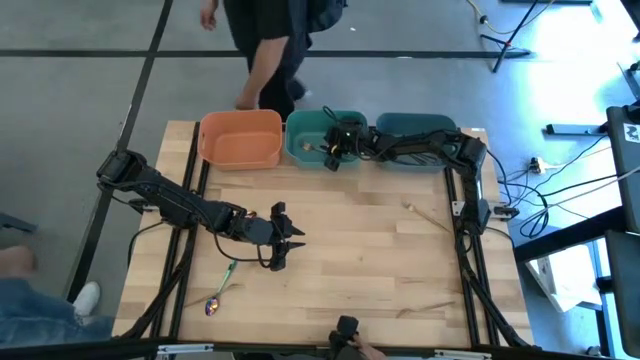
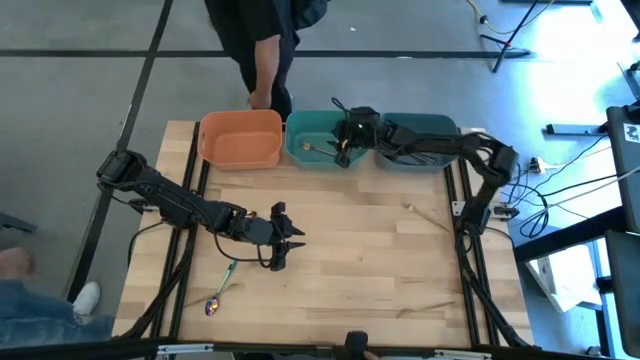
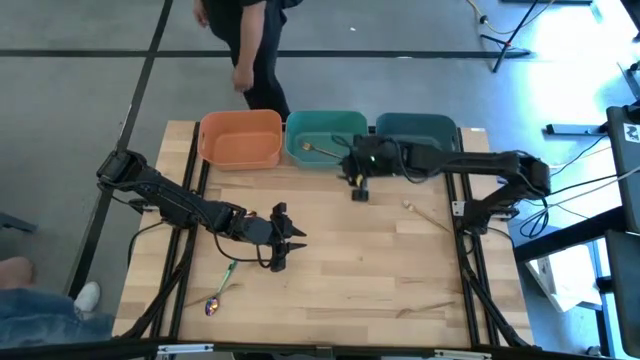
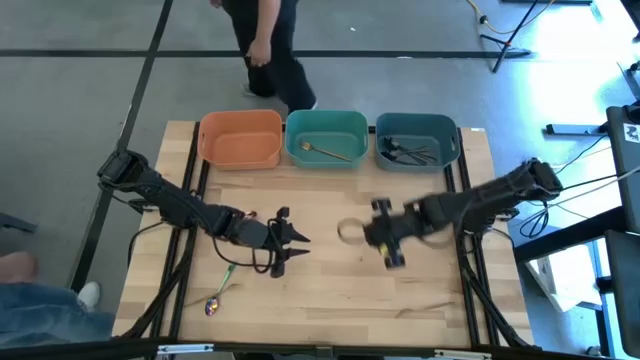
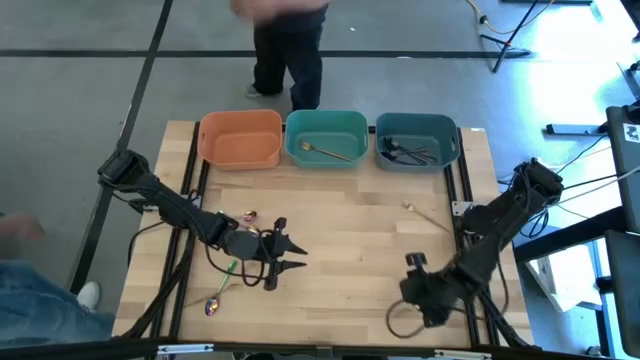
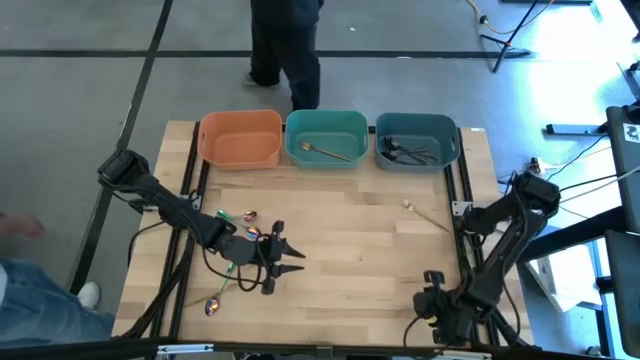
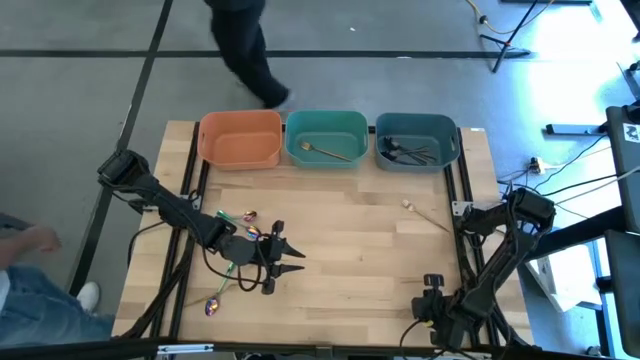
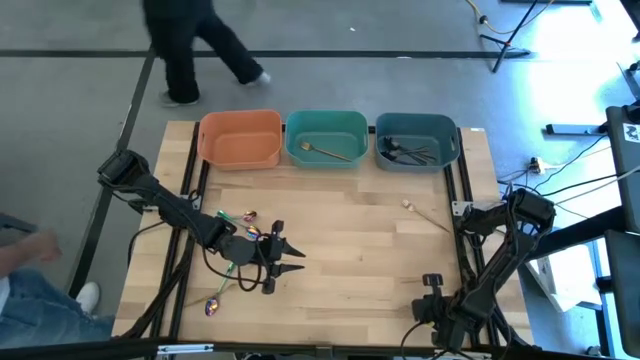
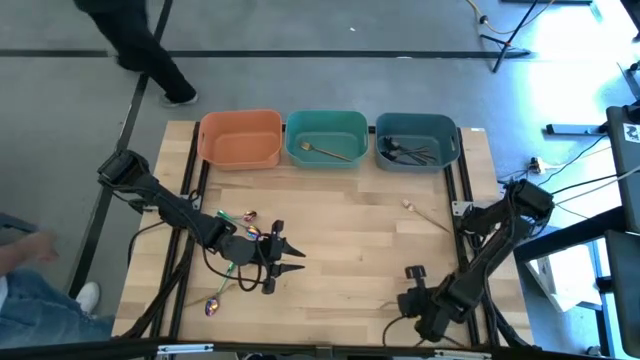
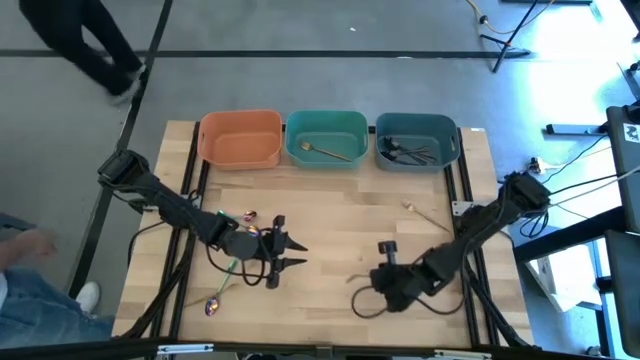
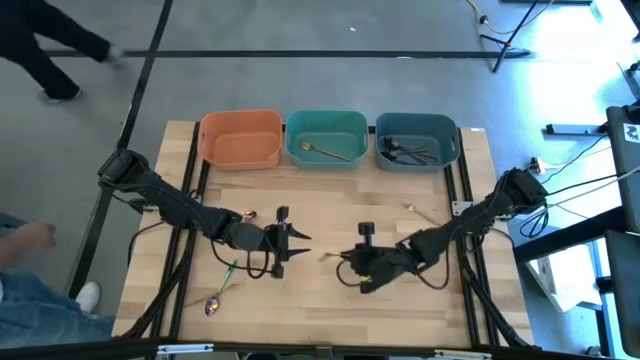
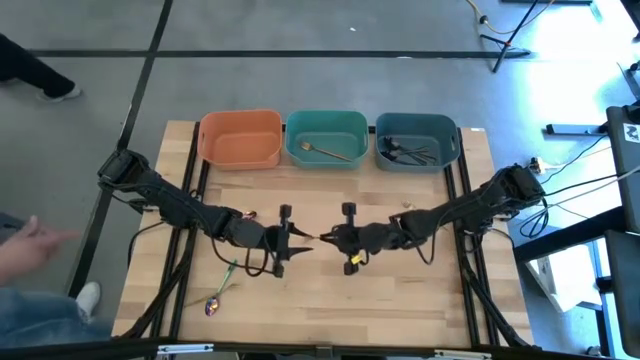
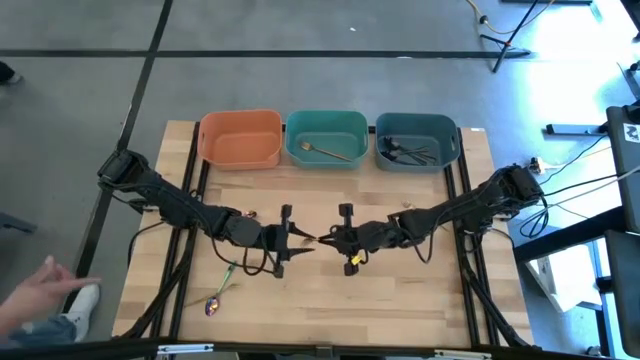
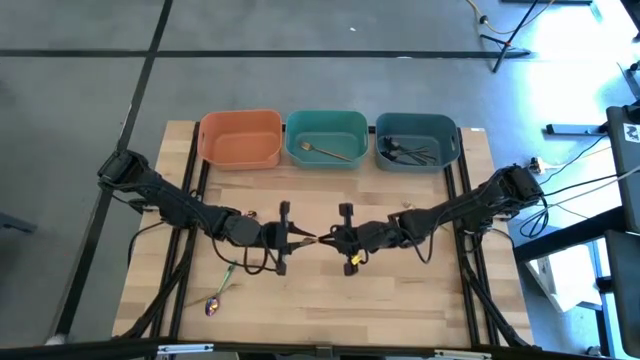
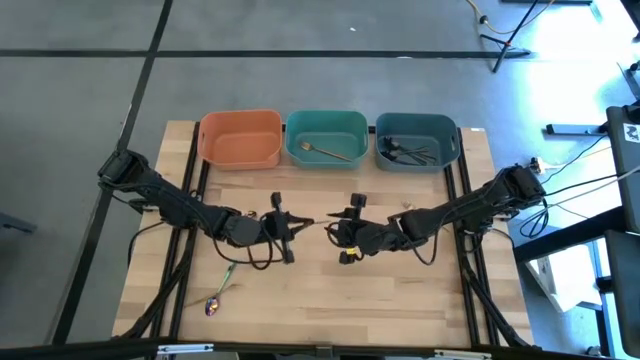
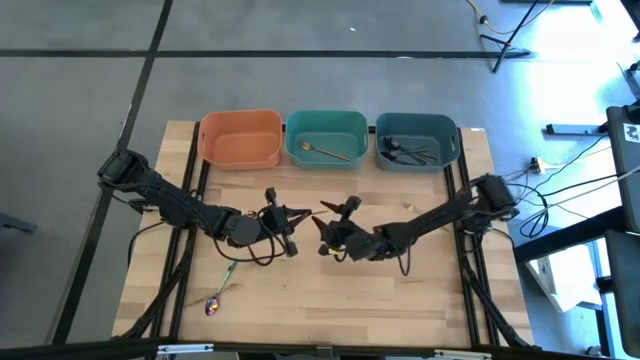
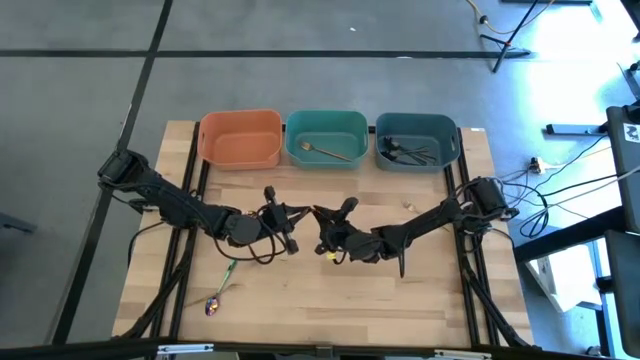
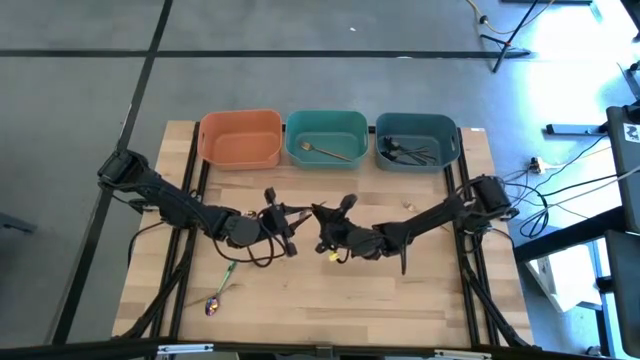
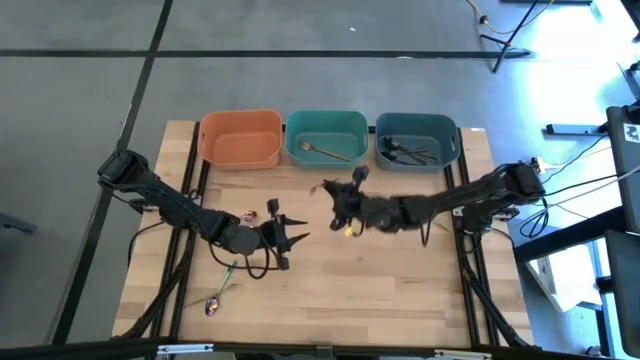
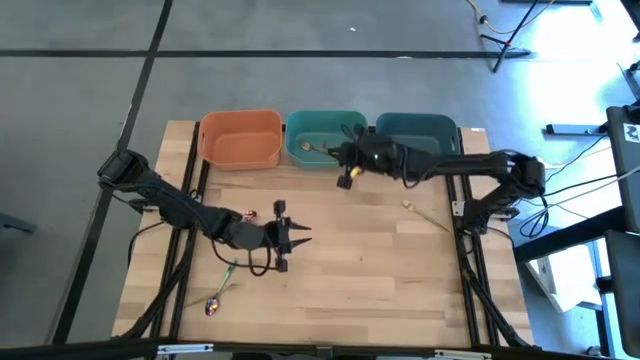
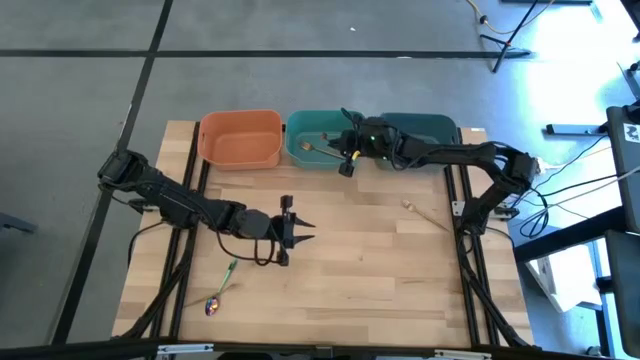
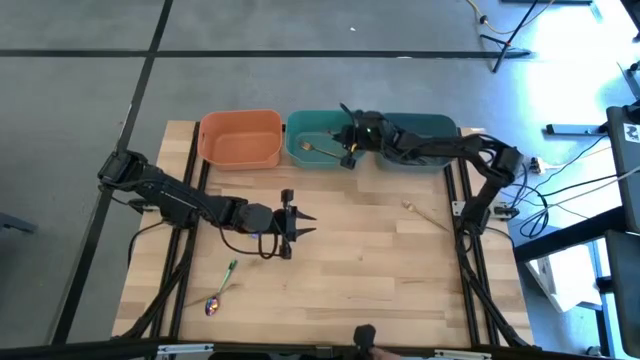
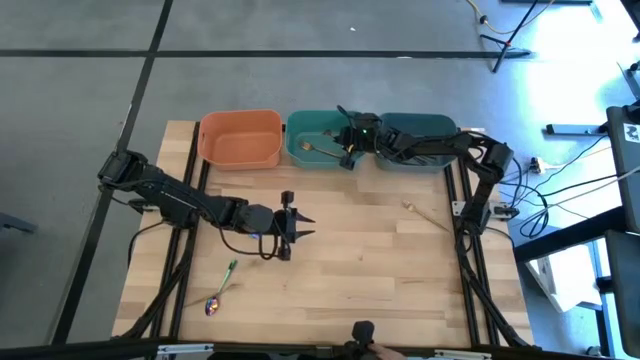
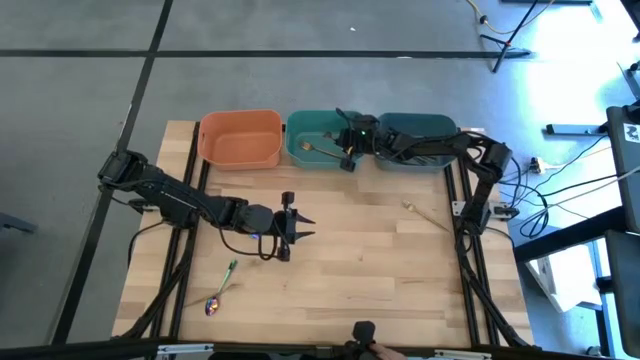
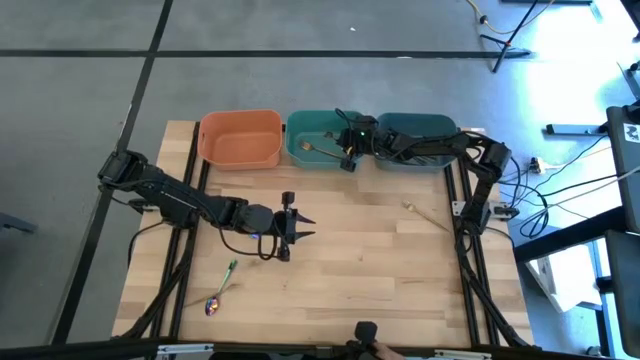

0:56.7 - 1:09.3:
Task: Sort silverware by color (type)
Put the gold fork into the green bin

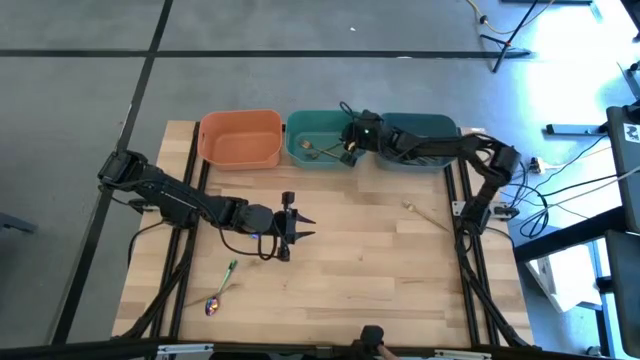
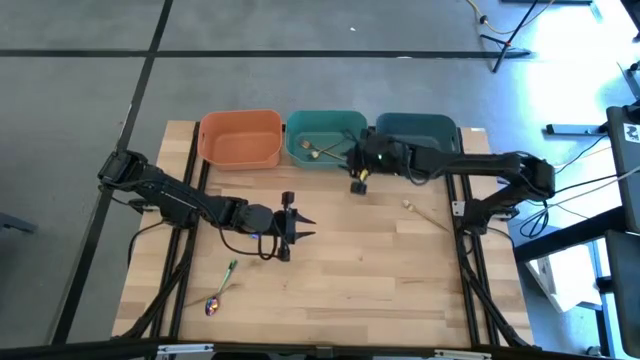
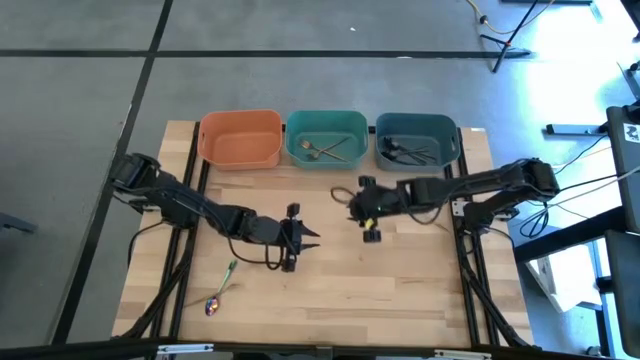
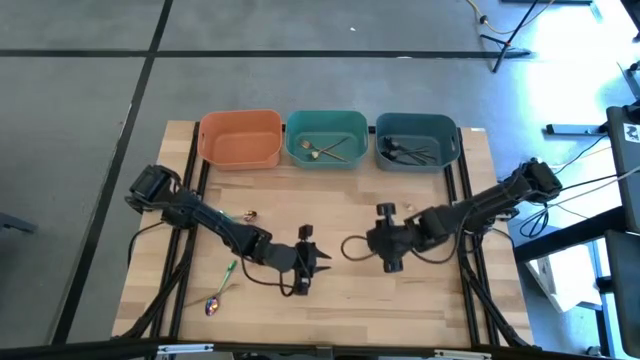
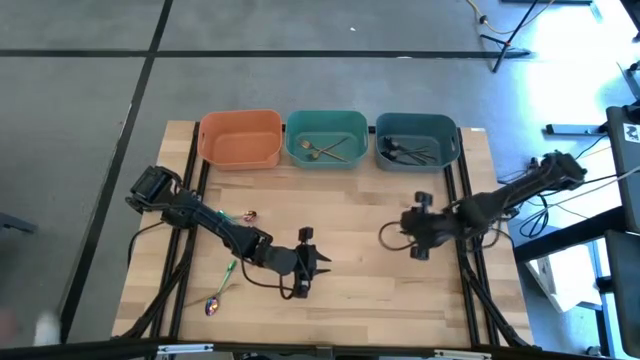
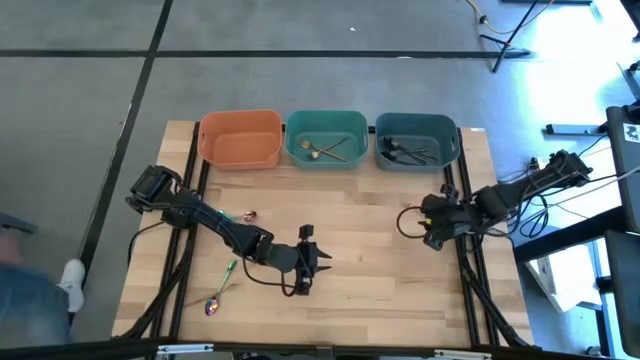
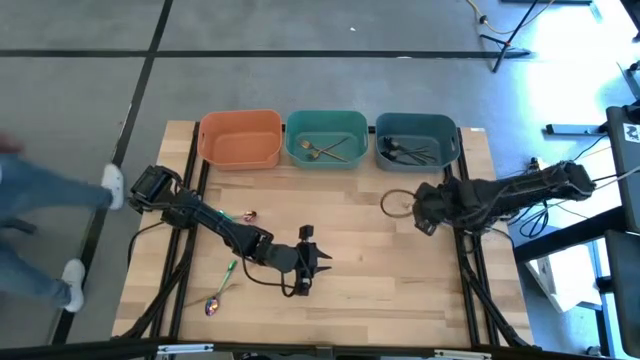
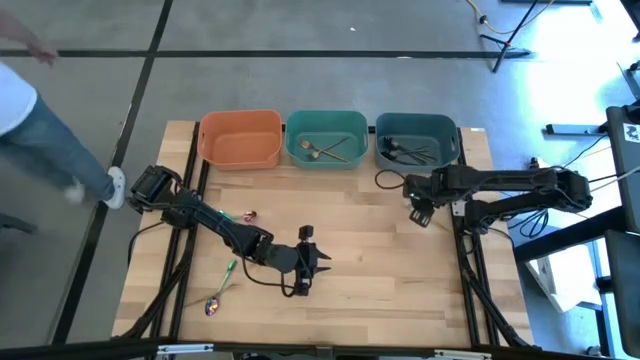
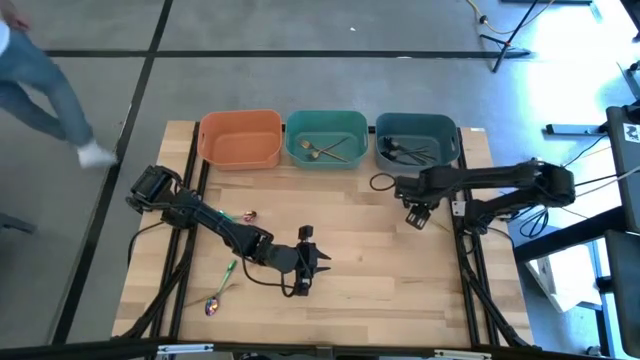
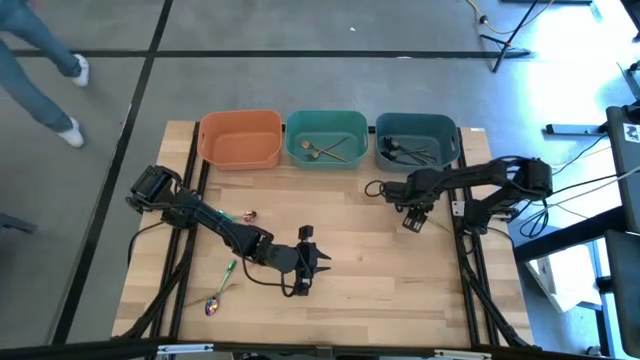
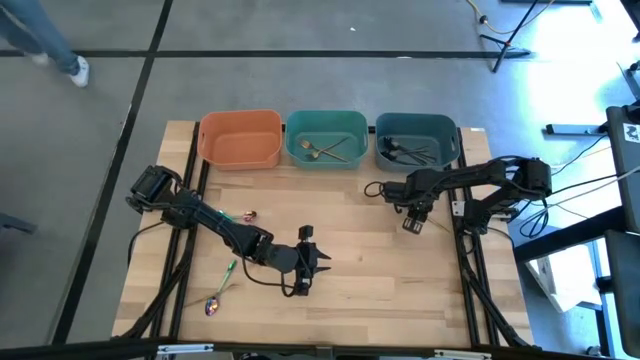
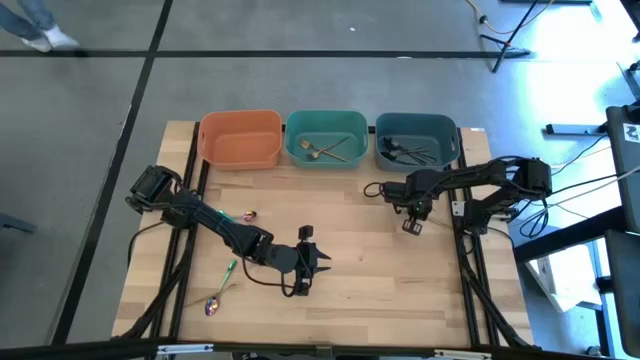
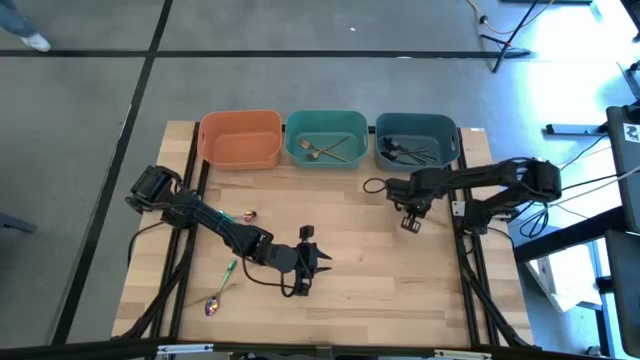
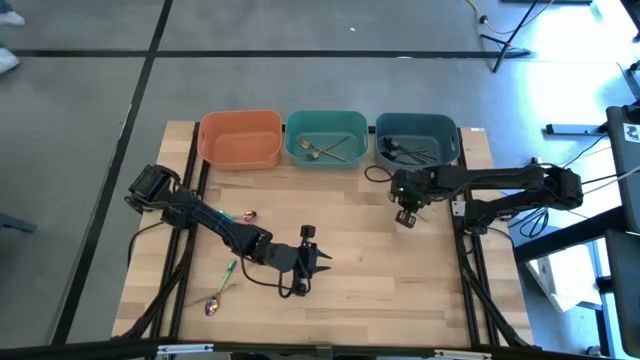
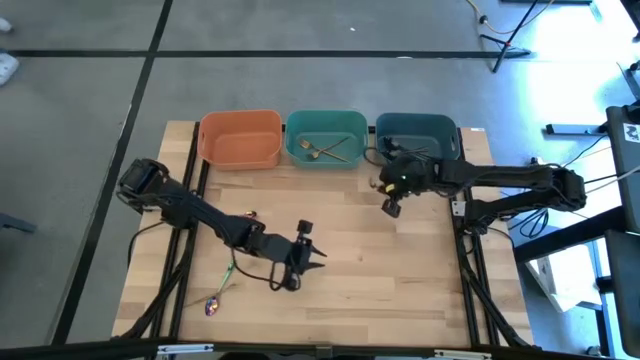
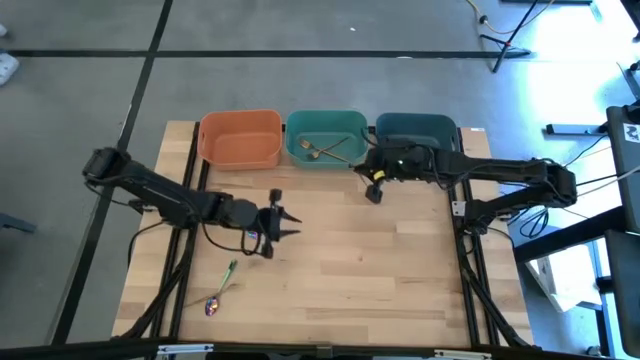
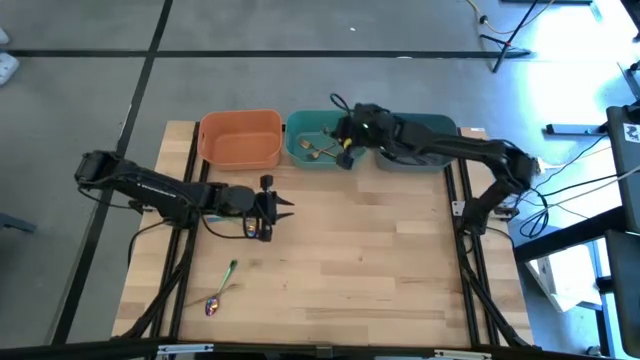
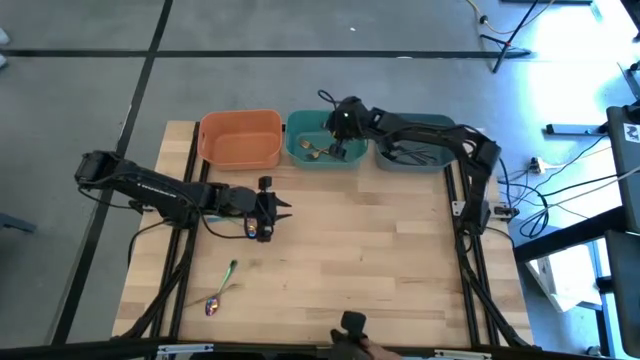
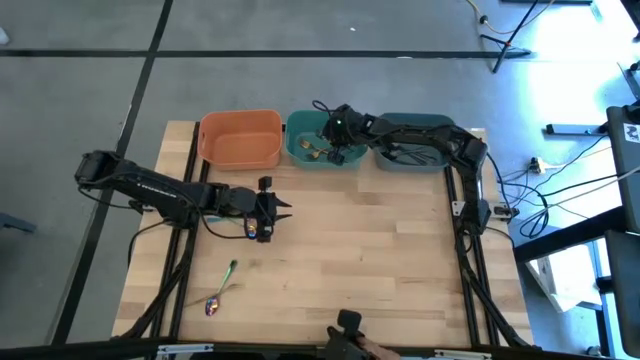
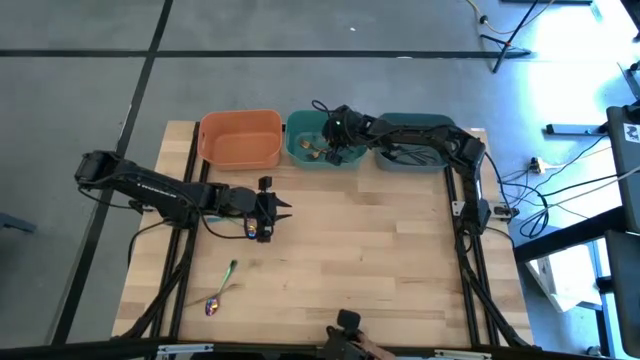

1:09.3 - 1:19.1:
Put the gold fork into the green bin
